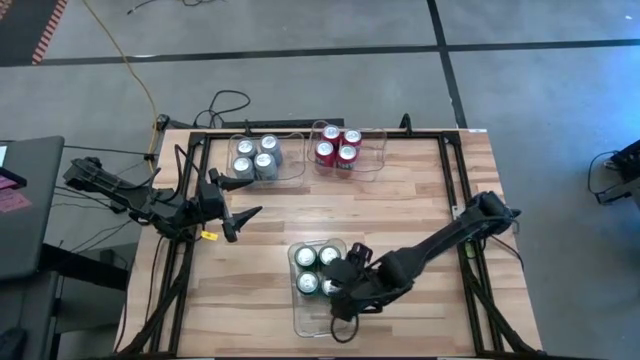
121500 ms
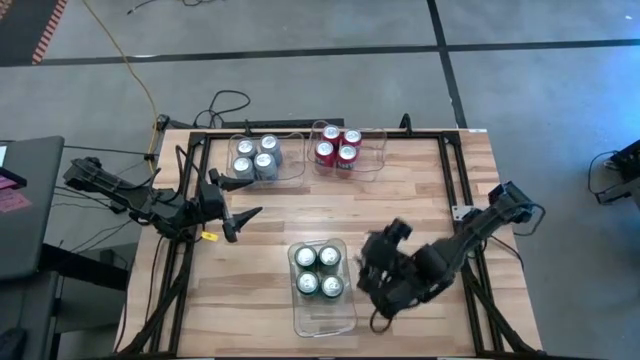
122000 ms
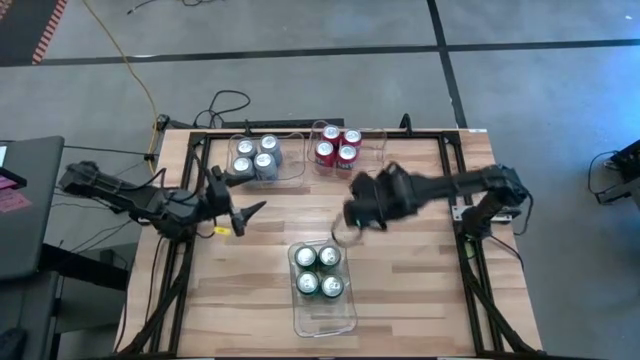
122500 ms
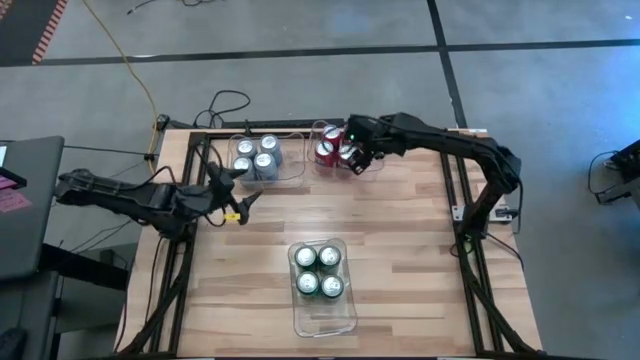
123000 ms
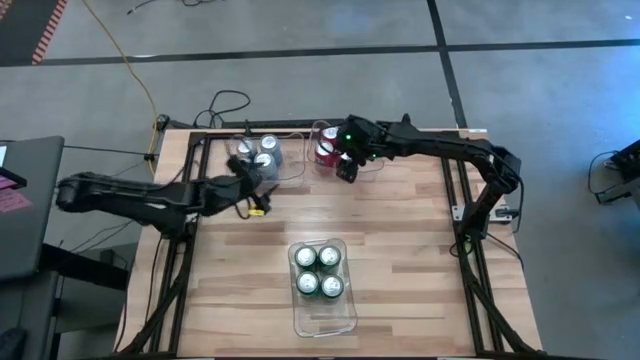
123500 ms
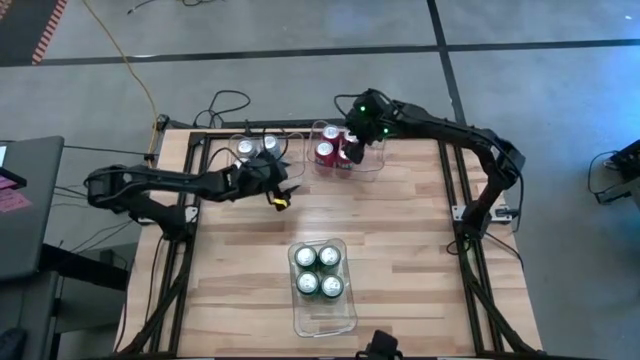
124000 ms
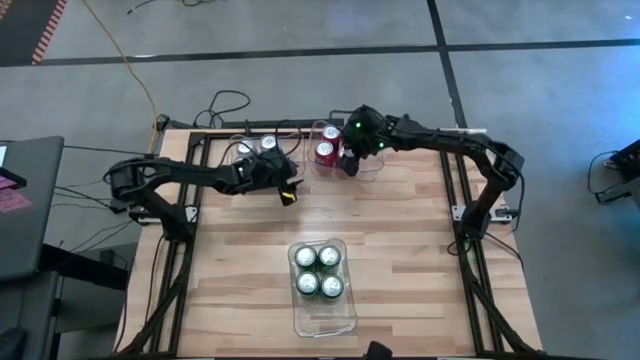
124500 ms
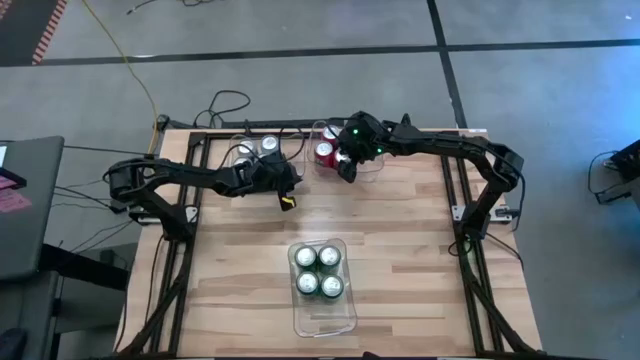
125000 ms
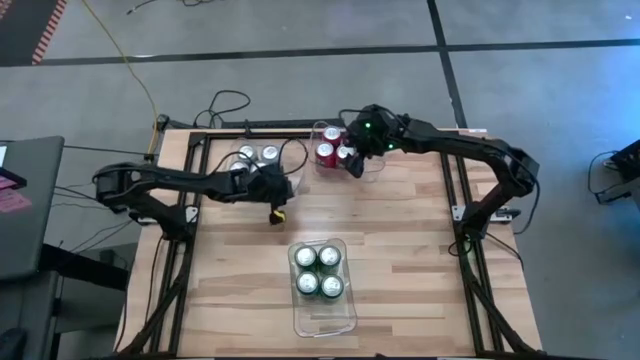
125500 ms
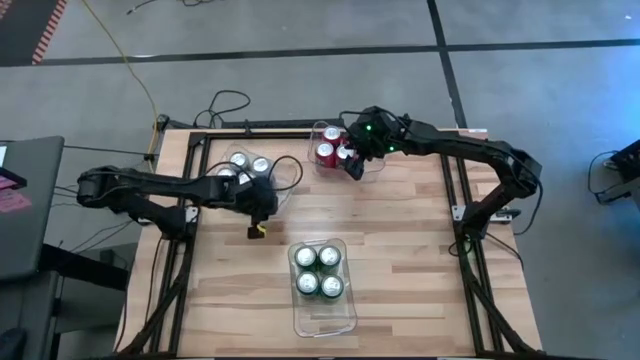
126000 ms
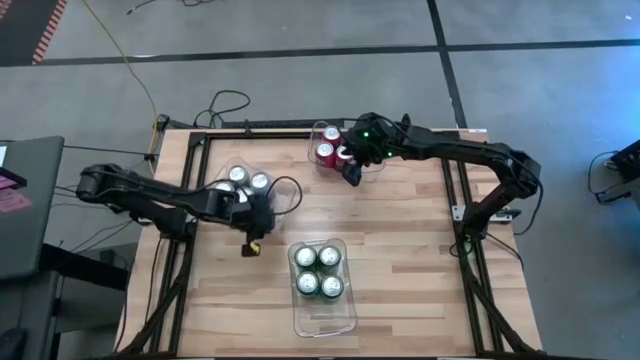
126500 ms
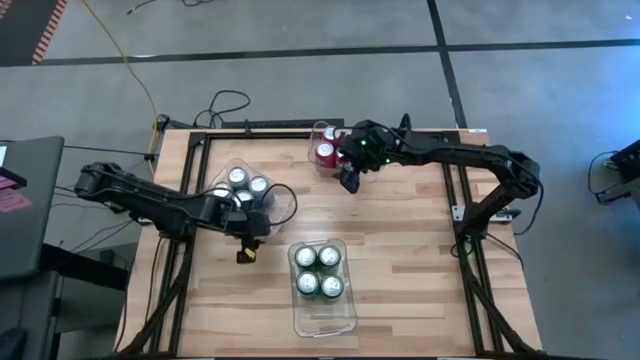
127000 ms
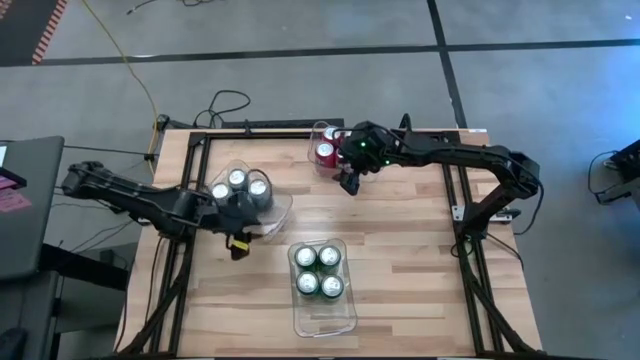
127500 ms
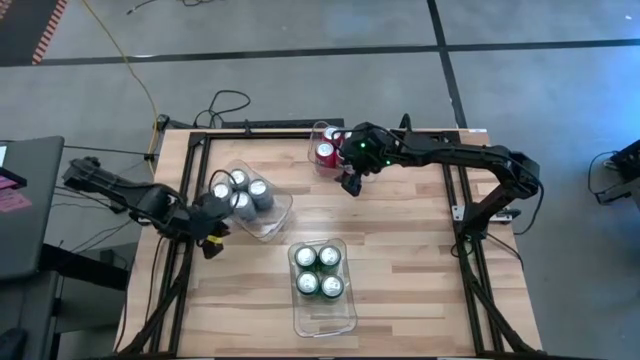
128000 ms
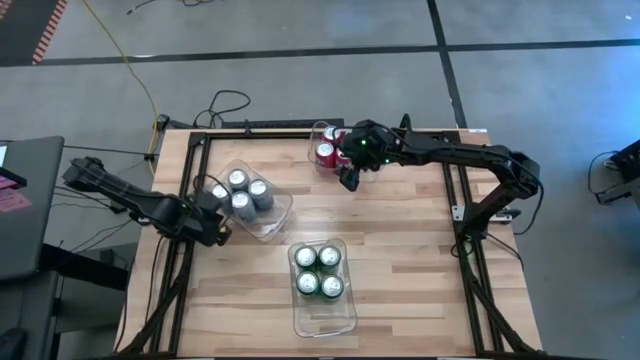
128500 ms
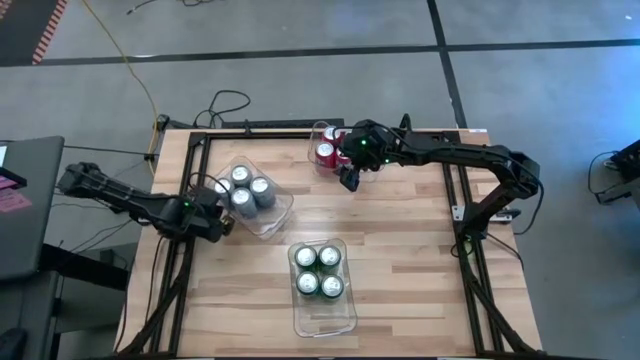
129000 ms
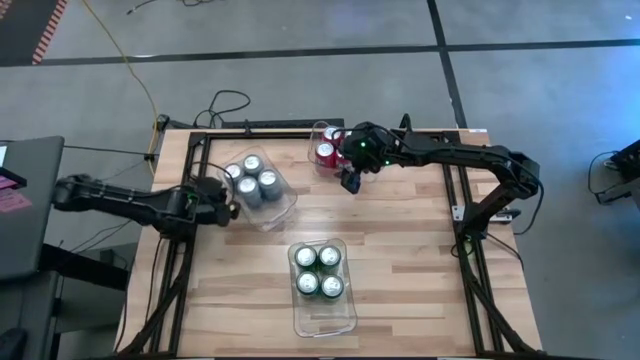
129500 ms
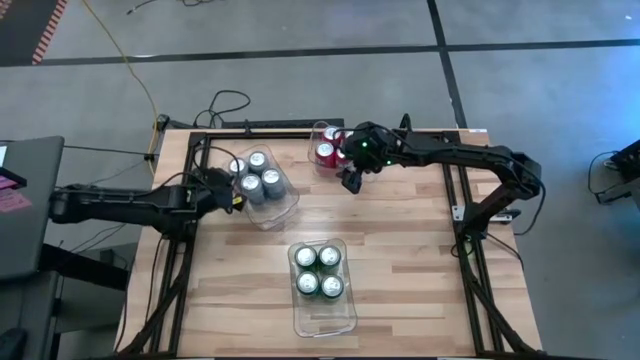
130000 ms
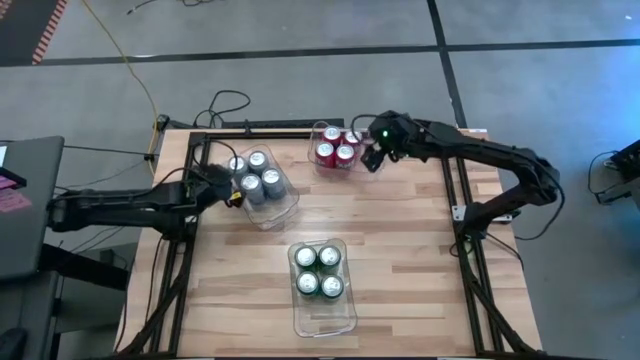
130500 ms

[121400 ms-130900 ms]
Task: Sort soda cans
Move the top left transparent bin to the top left of the table

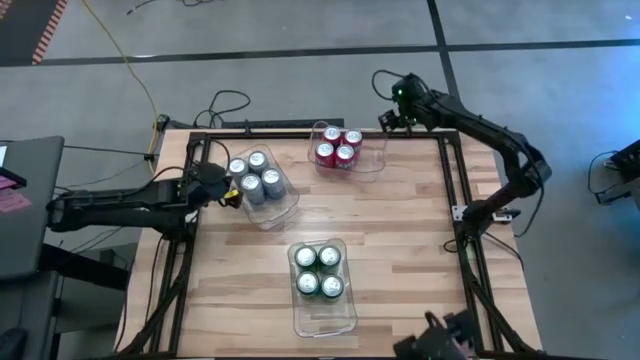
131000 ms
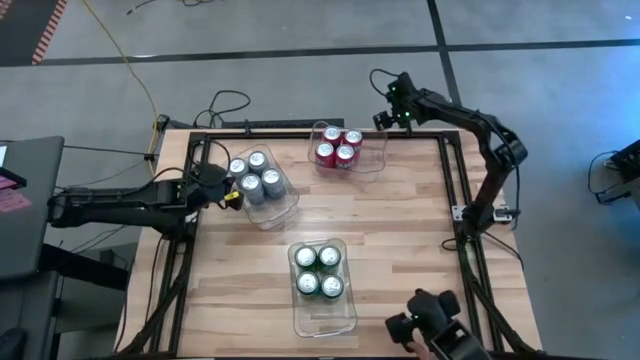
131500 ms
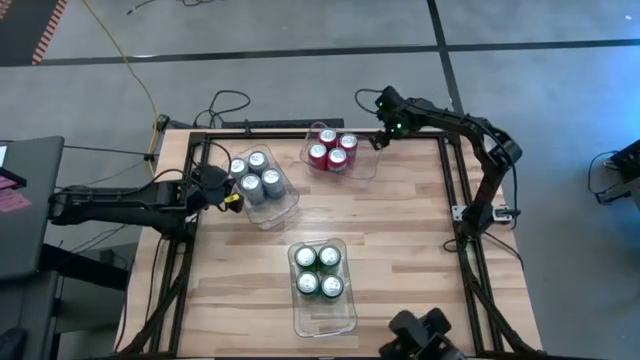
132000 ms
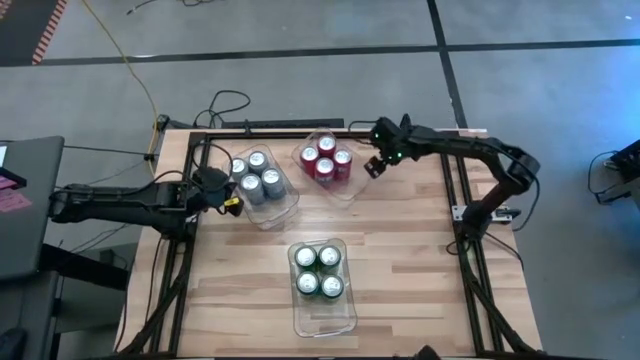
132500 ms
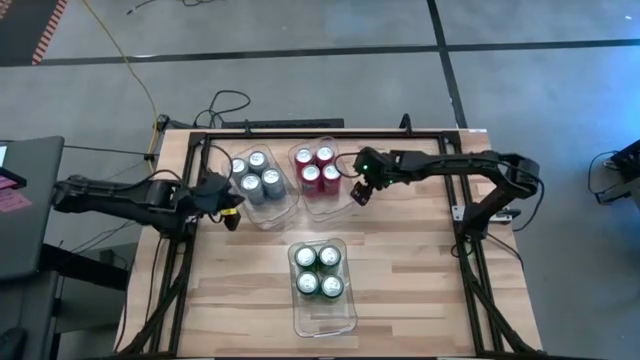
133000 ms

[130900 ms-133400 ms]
Move the top right transparent bin to the top center of the table

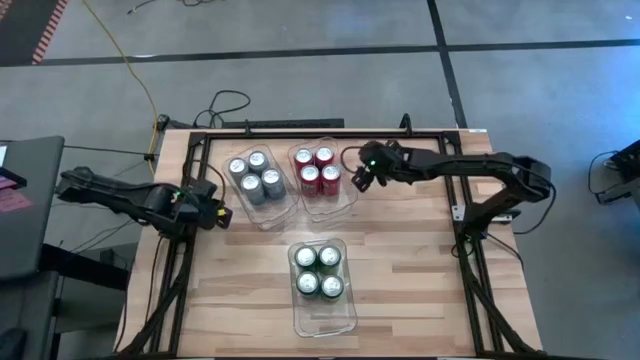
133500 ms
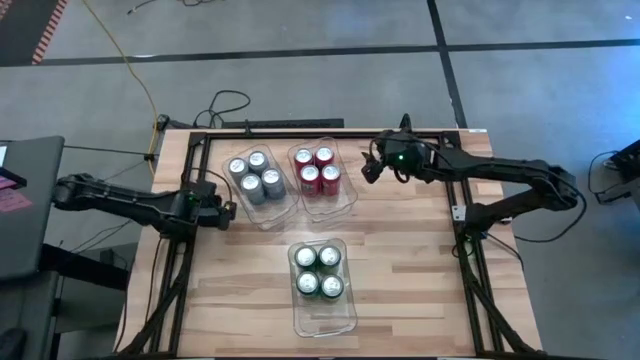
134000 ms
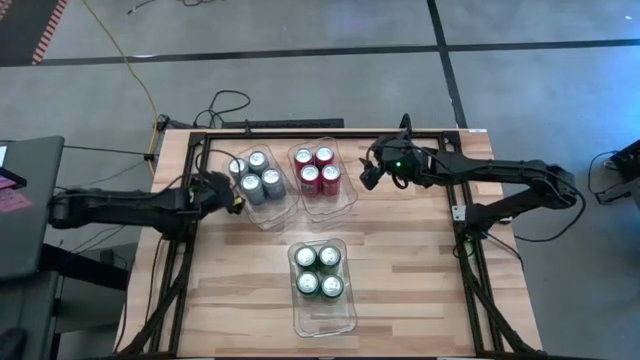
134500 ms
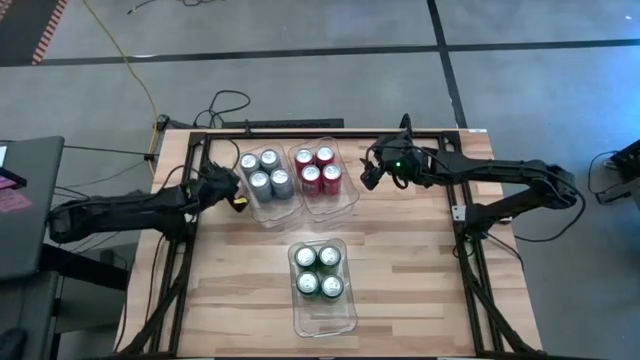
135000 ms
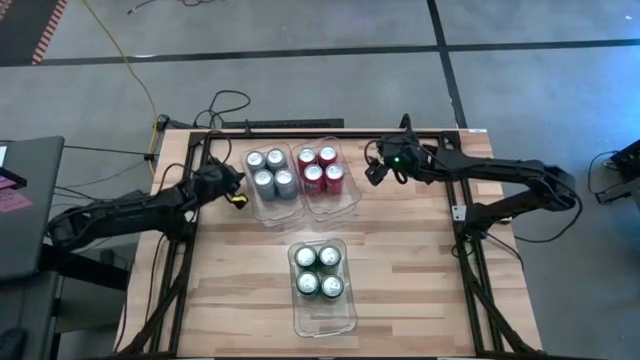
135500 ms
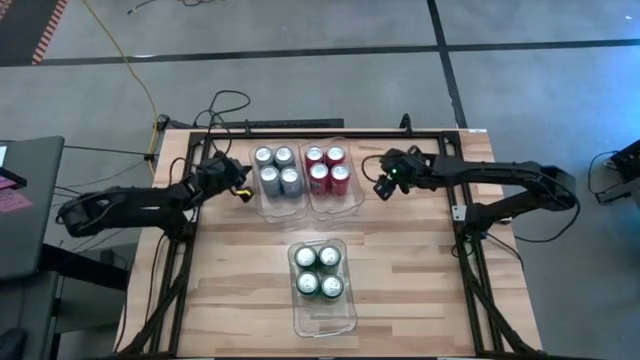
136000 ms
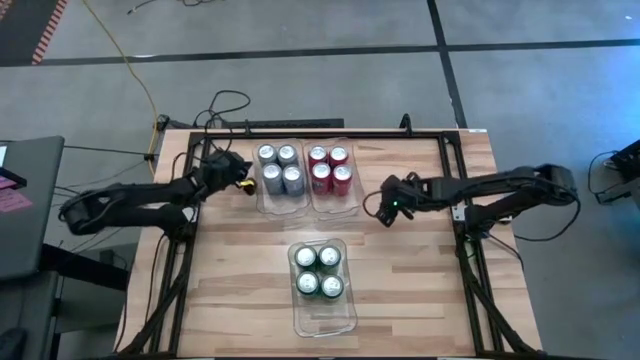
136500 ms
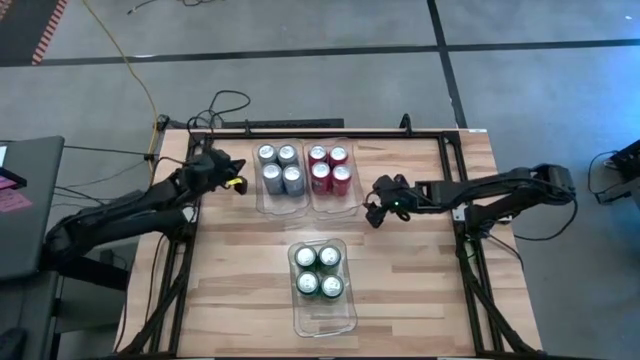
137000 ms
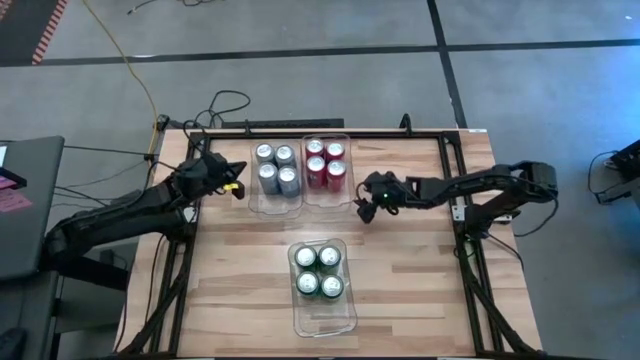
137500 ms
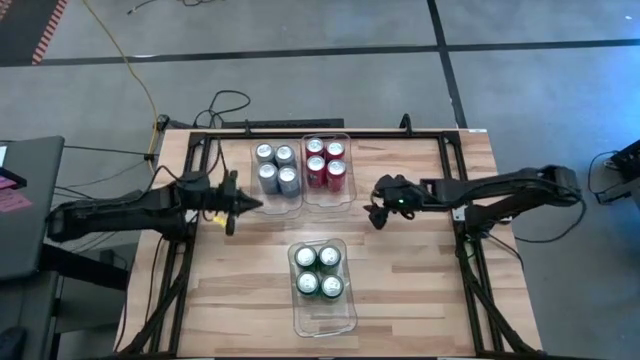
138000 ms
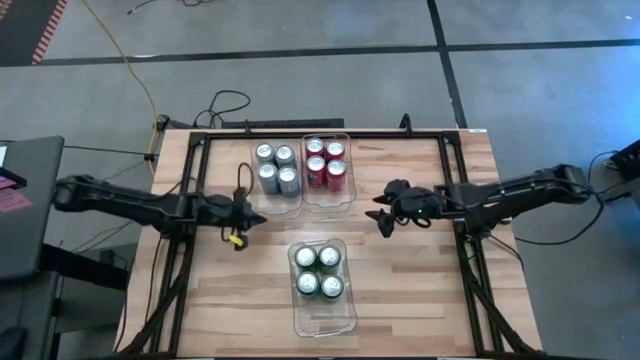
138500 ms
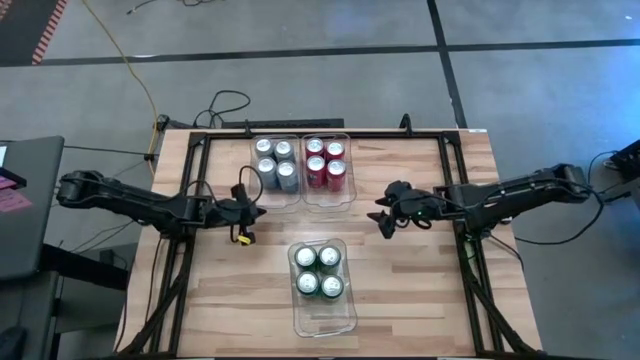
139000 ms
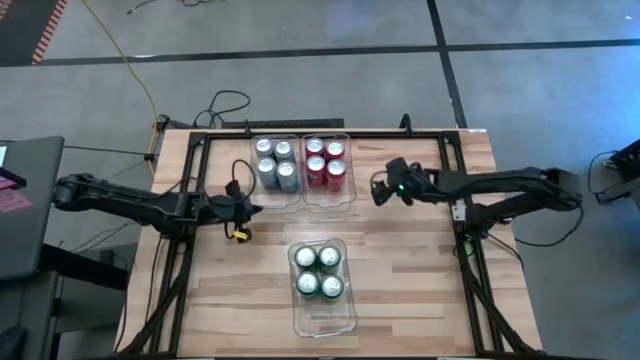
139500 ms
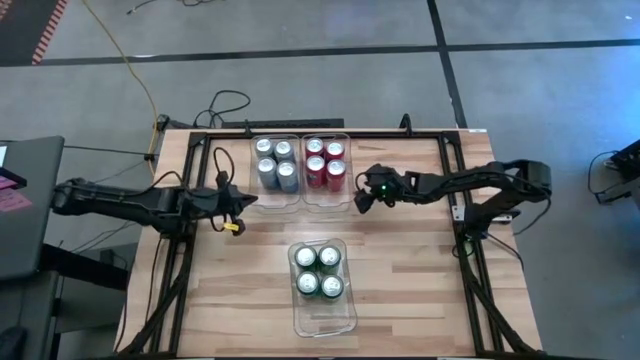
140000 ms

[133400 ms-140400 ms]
Adjust the transparent bins on the table
